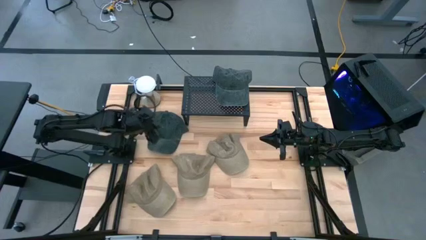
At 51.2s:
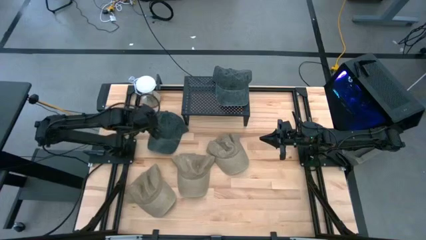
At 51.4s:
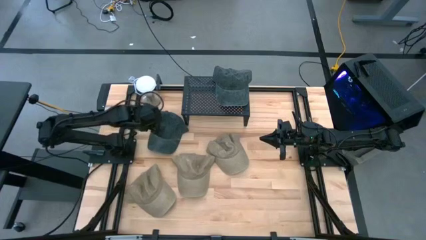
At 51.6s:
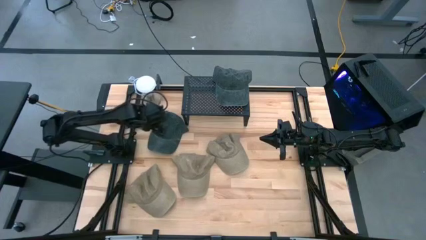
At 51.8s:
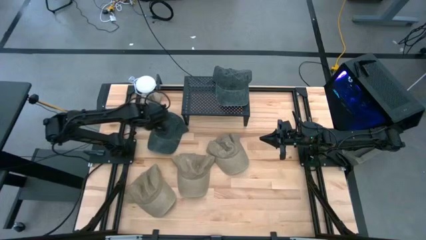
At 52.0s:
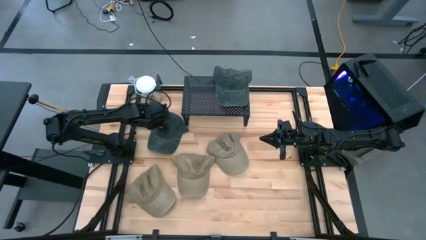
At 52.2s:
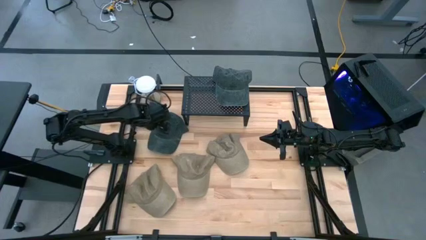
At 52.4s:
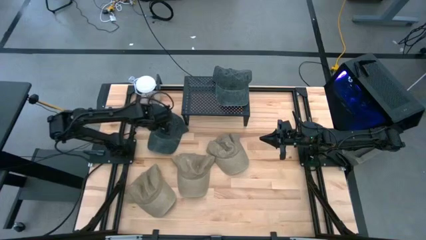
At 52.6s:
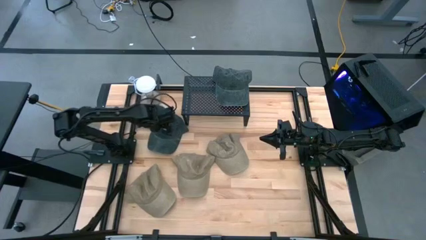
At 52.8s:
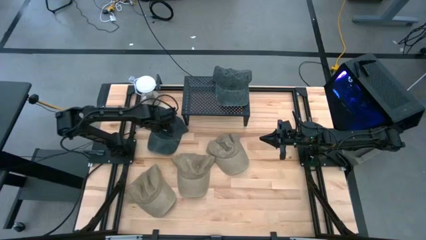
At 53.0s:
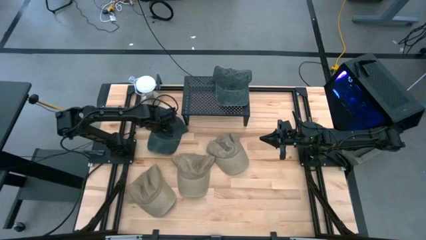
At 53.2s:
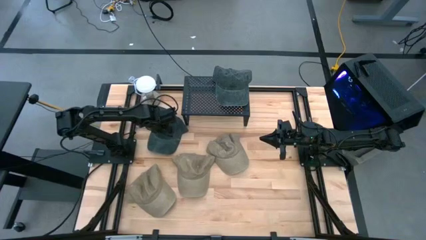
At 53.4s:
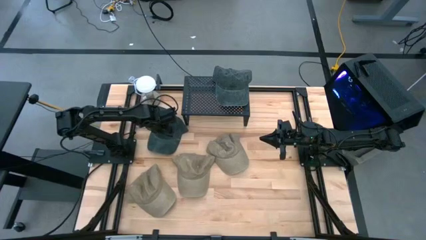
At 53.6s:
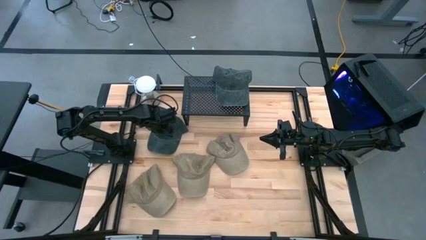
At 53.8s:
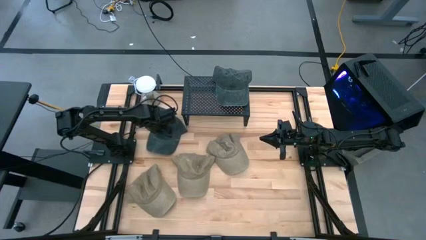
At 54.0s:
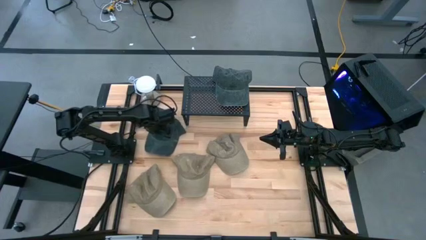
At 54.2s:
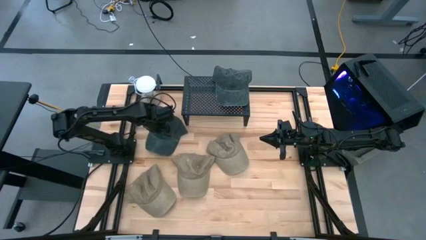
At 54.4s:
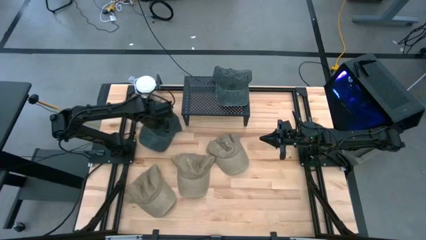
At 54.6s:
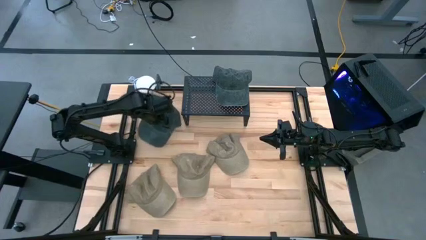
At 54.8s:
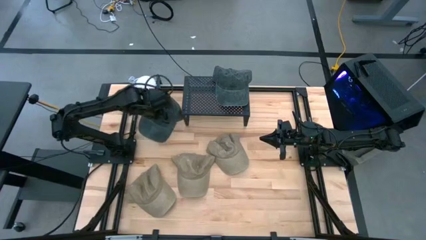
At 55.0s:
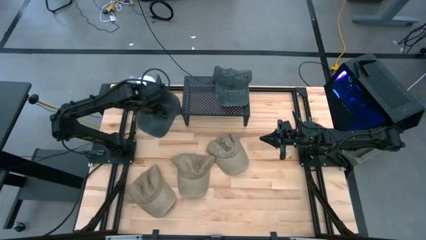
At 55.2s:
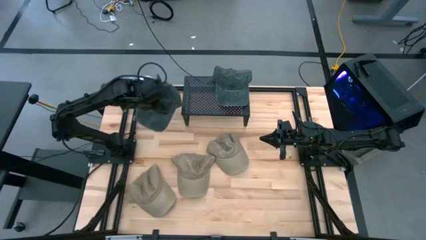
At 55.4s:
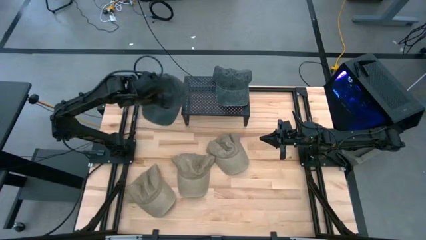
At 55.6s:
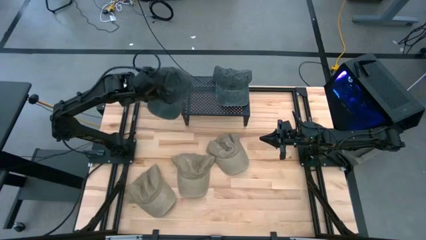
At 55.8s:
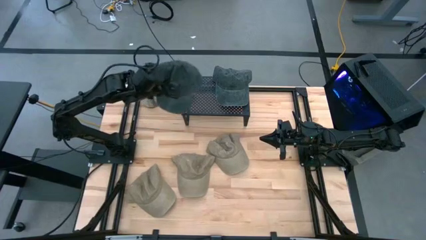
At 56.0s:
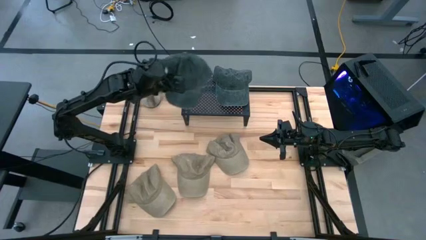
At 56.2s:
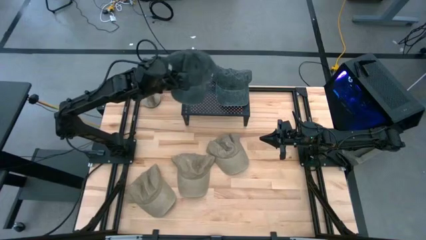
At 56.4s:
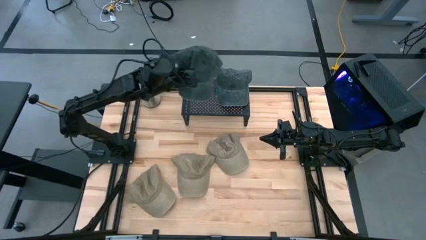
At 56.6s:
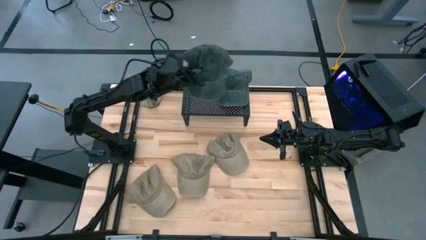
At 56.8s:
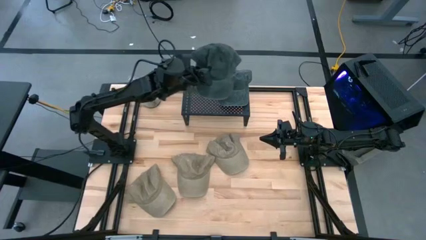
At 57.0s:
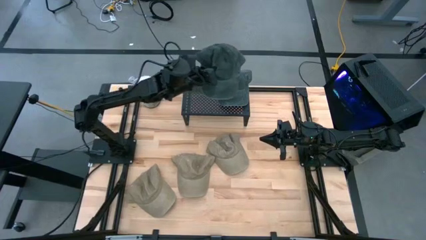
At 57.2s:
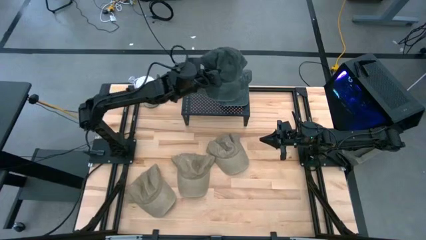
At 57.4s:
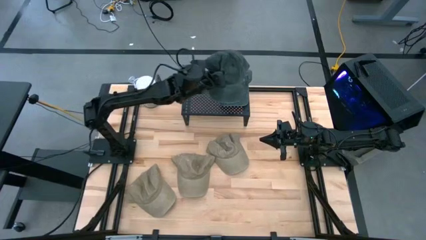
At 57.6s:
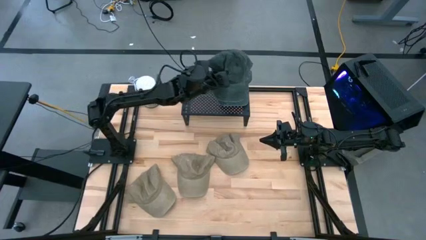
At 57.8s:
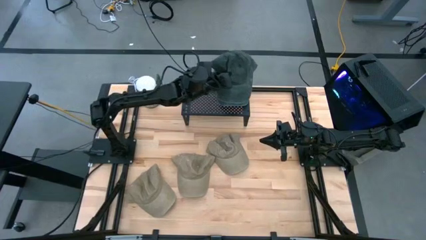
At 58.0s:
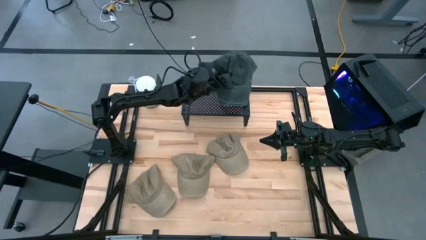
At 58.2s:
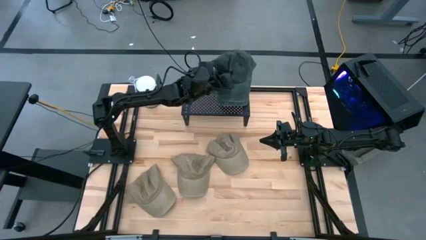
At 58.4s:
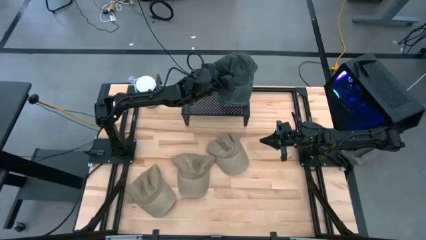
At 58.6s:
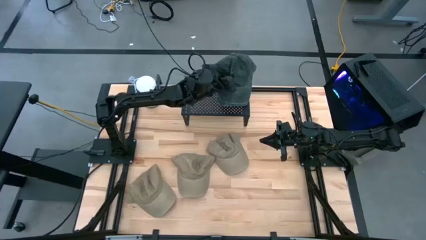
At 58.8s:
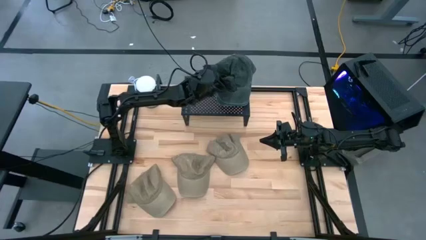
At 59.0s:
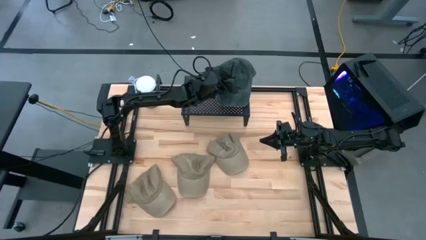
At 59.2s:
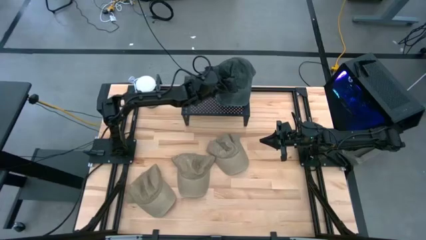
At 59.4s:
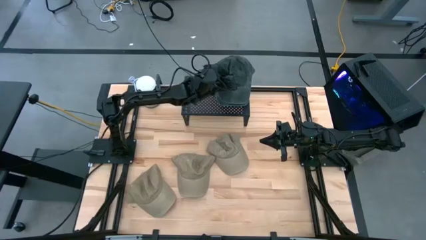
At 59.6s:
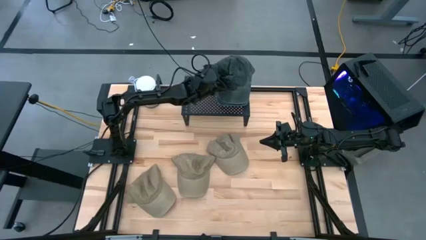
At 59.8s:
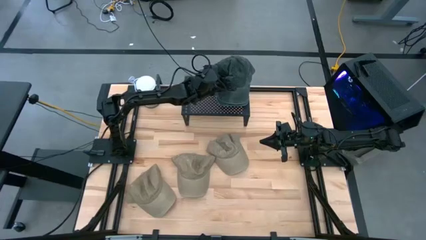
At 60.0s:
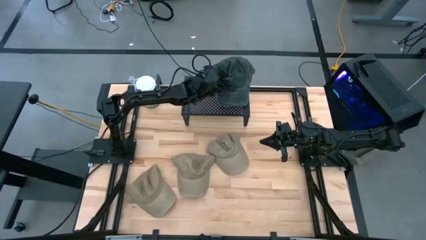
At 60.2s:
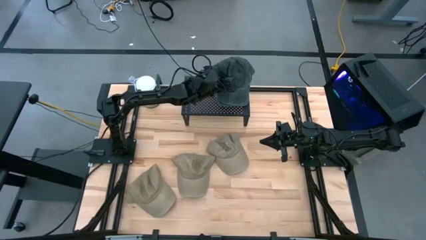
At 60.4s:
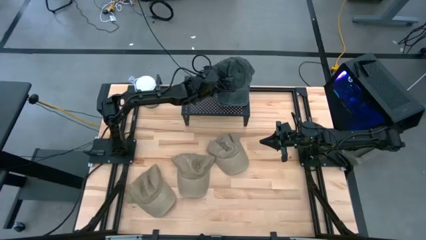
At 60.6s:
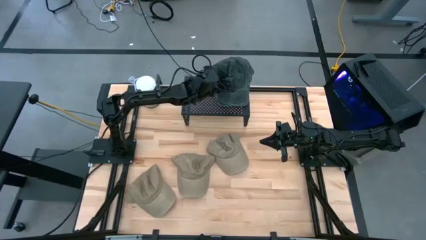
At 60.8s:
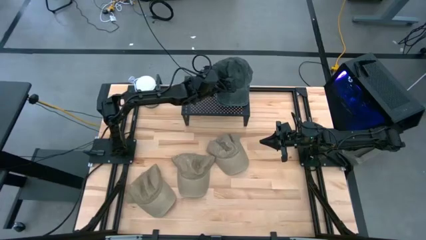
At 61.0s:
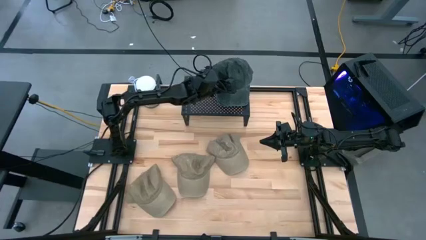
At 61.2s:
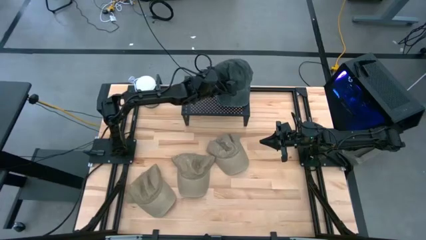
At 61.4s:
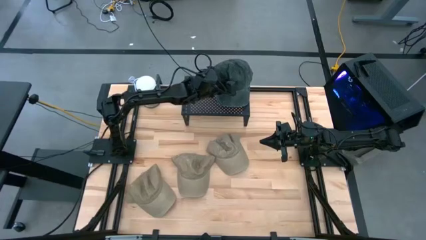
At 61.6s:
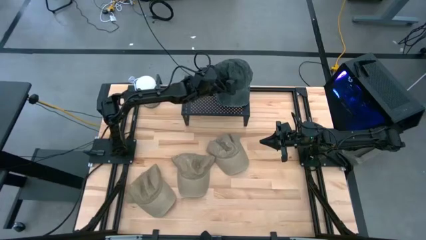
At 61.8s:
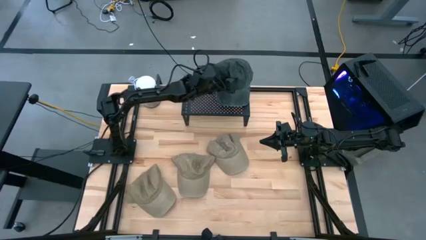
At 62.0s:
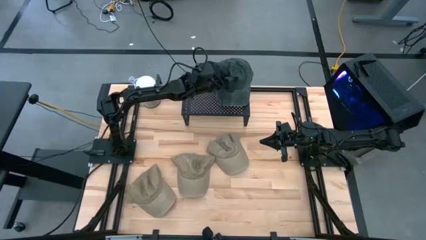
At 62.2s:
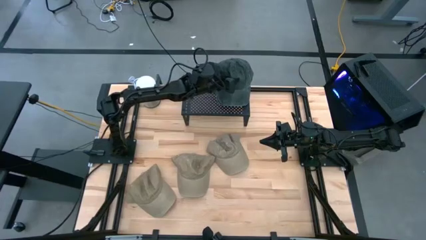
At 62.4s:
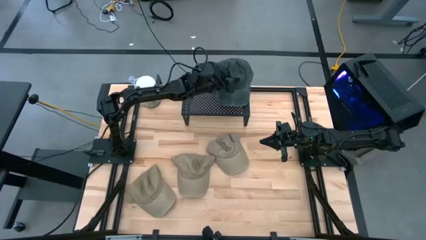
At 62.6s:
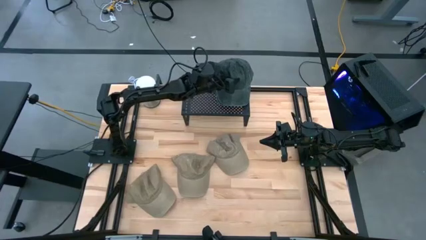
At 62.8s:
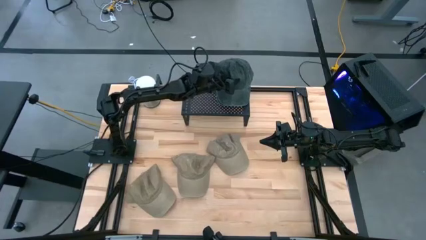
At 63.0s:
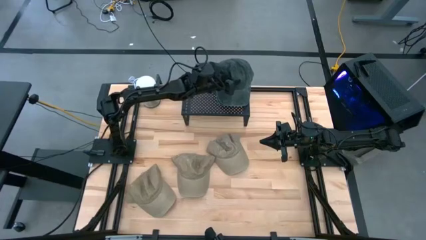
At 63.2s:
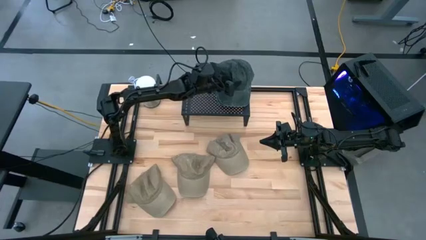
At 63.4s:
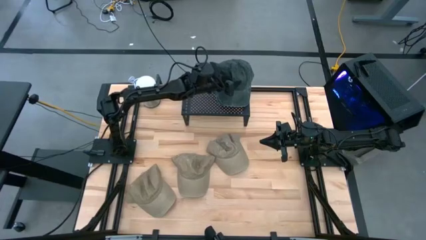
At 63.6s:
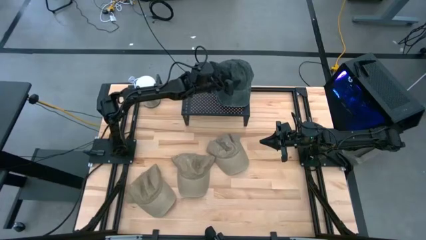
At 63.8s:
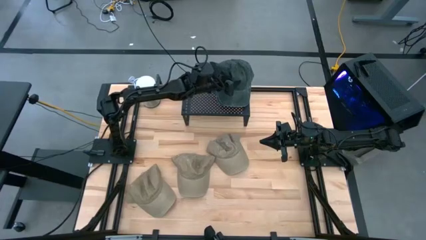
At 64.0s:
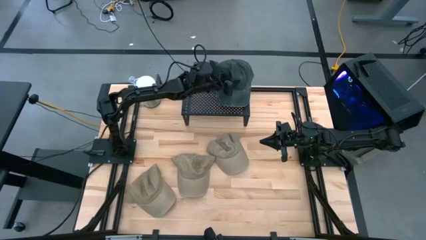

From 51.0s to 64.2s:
Task: Pick & Place hat
Stack the green cap on the other green cap on the shelf

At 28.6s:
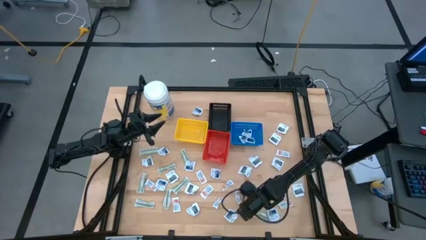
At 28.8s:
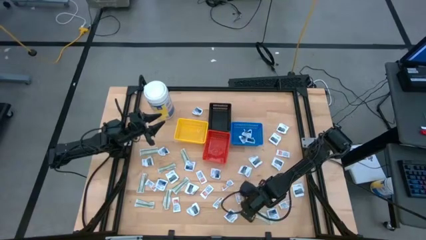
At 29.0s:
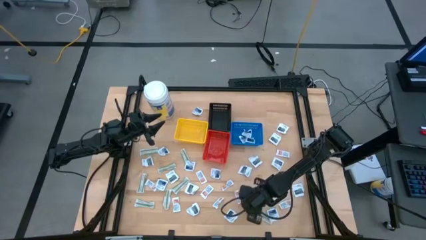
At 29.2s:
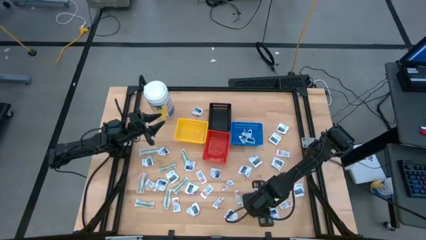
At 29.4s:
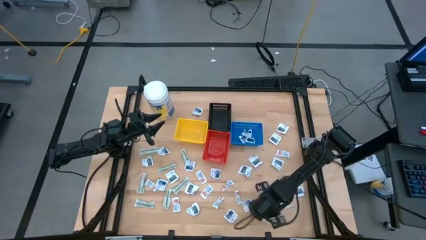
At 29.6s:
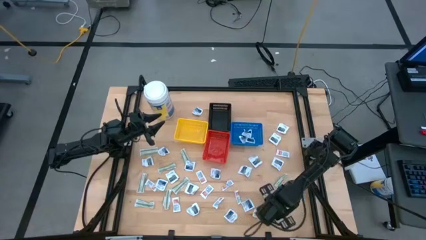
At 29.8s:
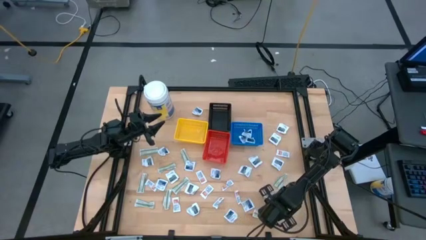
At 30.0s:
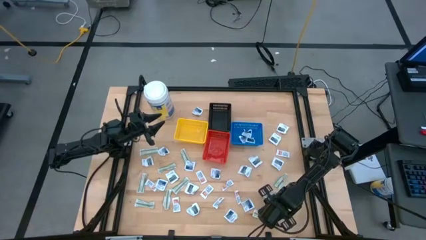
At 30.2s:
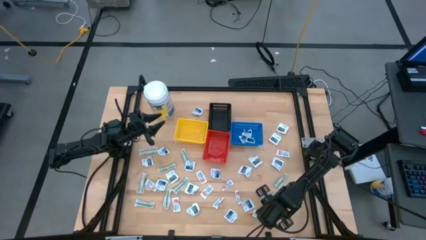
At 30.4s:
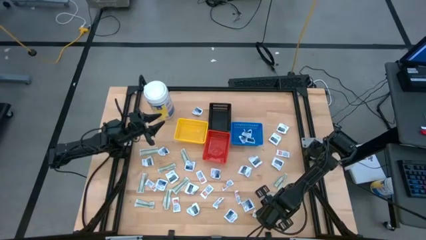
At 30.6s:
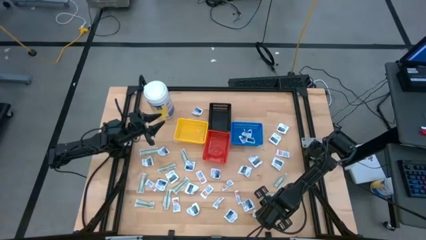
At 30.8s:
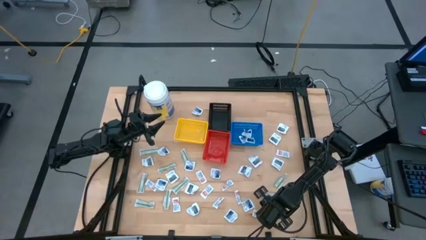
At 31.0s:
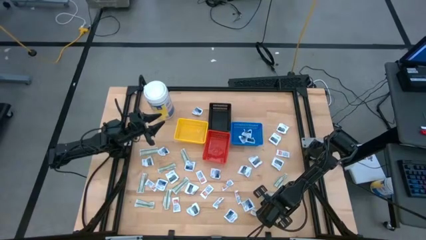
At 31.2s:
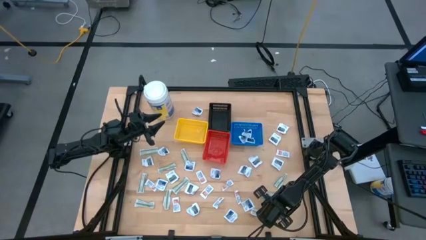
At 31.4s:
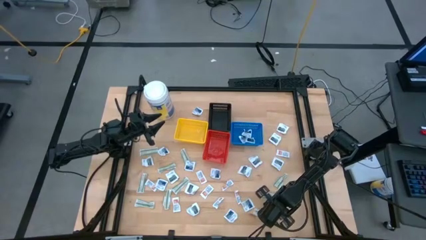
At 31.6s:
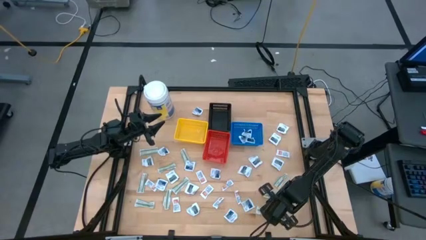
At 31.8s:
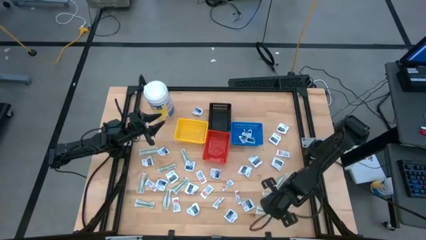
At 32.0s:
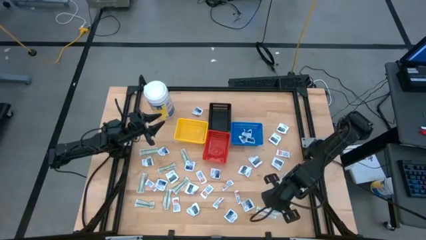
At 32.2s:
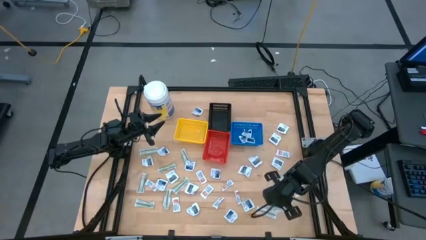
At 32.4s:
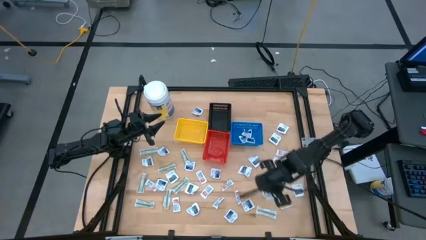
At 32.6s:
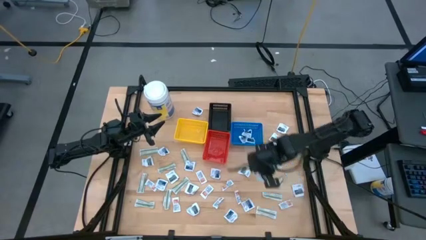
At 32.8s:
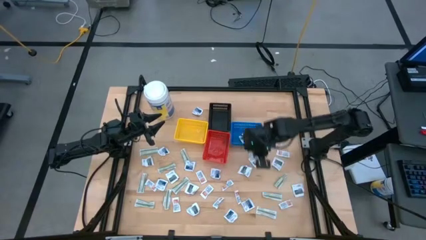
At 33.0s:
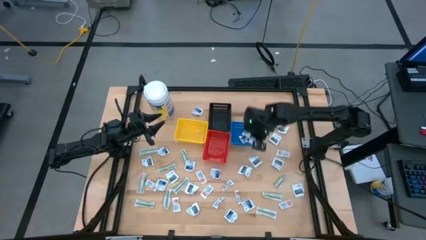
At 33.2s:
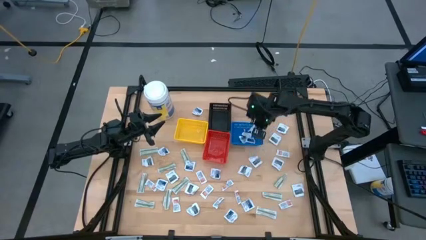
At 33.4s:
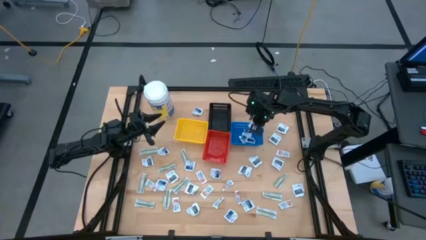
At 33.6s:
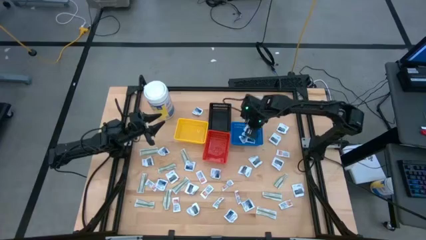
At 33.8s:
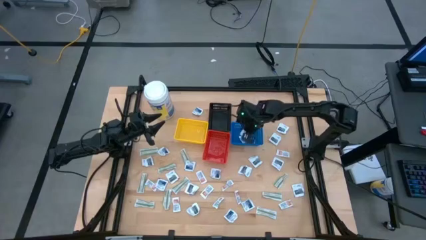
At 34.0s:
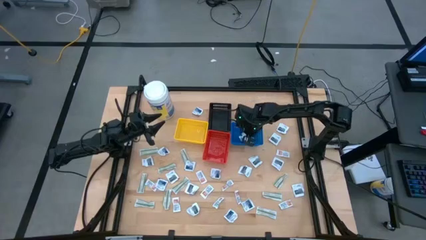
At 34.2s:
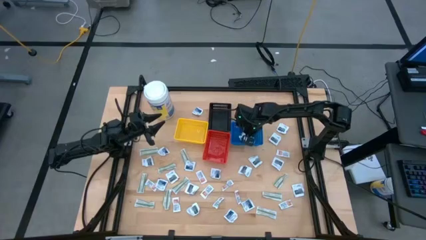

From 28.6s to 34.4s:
Task: Pick & Place First Aid Supplies
Put the alcohol pad into the blue bin
